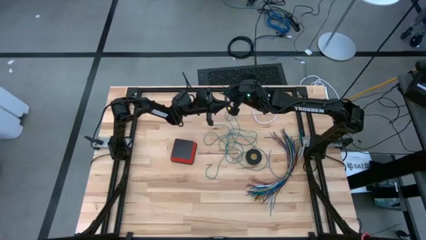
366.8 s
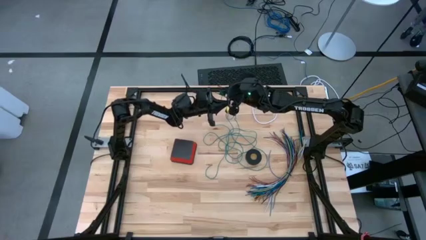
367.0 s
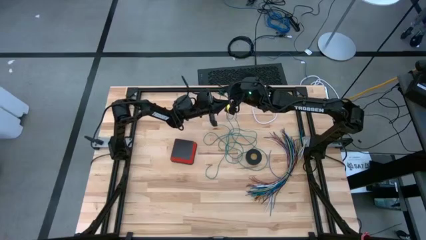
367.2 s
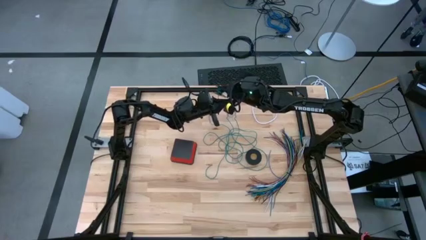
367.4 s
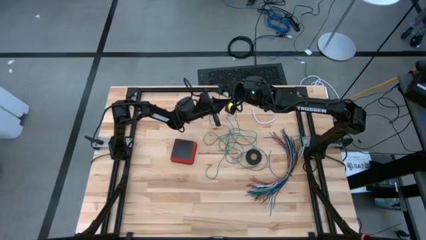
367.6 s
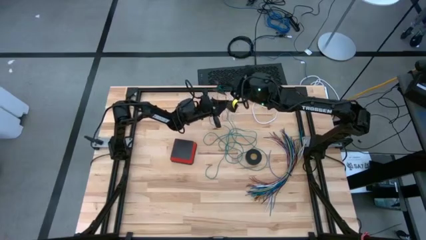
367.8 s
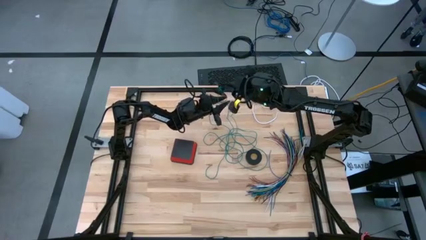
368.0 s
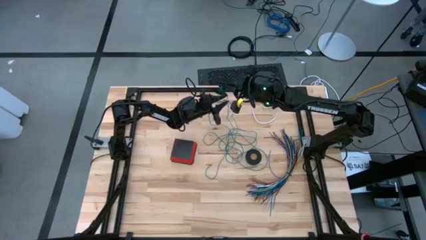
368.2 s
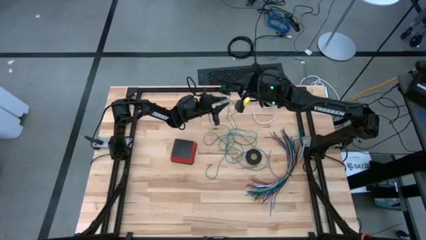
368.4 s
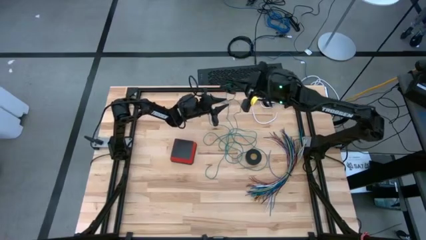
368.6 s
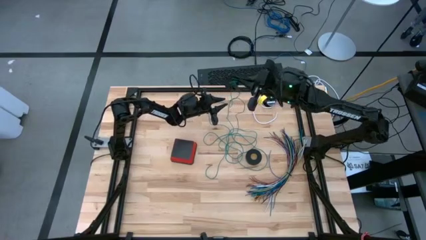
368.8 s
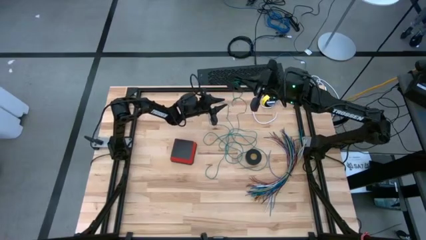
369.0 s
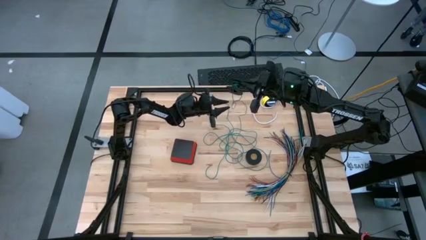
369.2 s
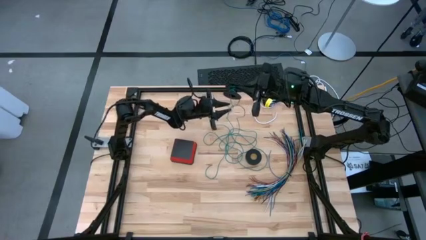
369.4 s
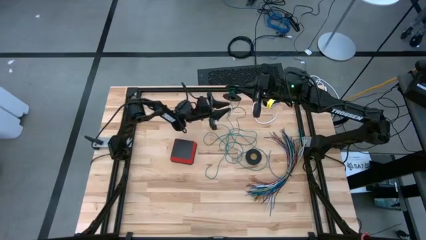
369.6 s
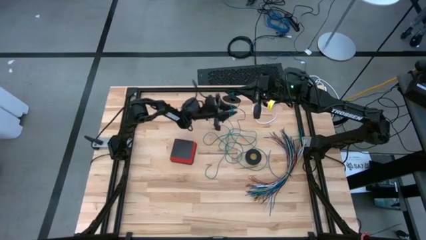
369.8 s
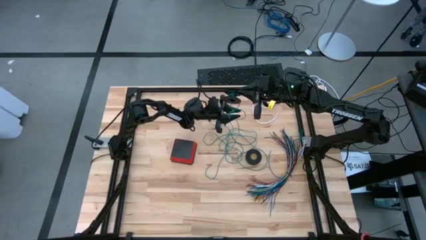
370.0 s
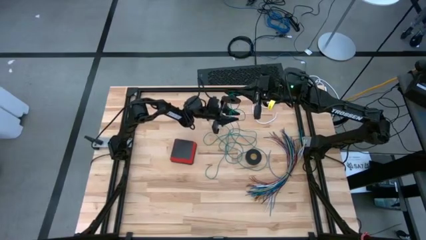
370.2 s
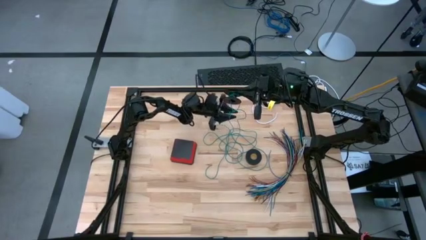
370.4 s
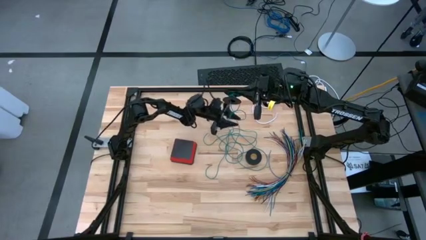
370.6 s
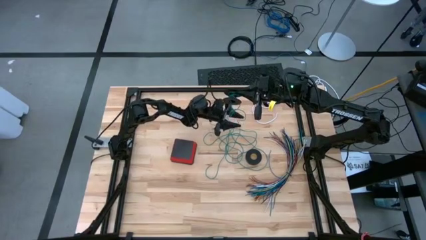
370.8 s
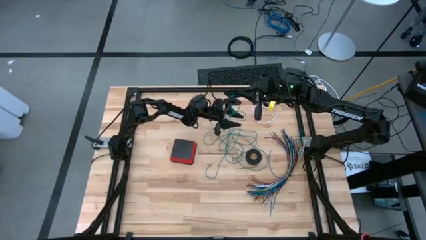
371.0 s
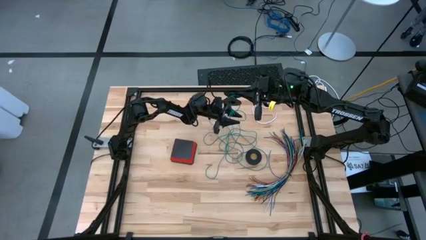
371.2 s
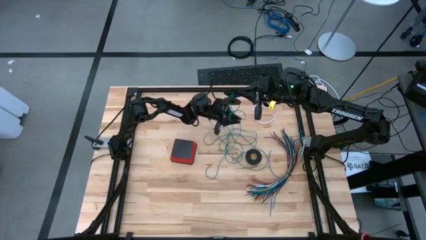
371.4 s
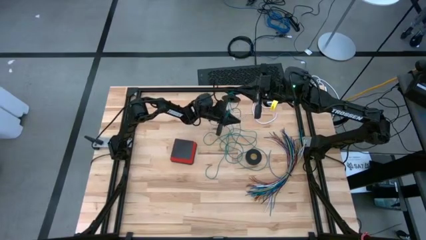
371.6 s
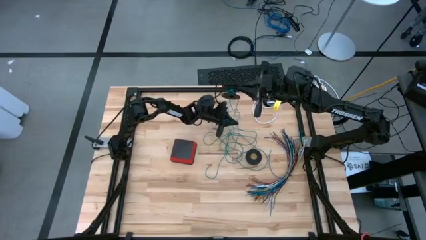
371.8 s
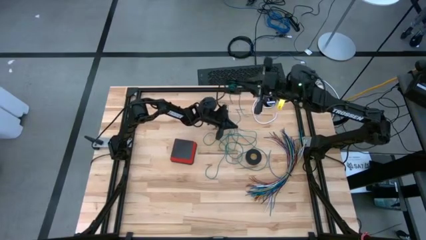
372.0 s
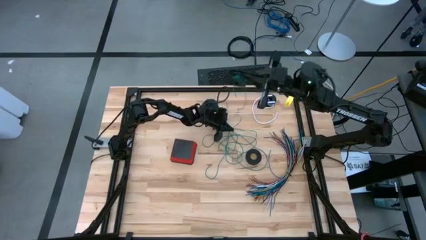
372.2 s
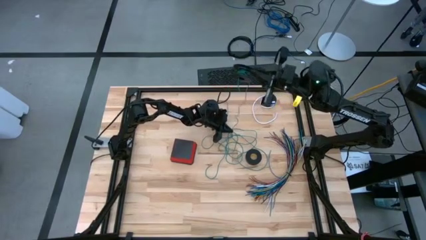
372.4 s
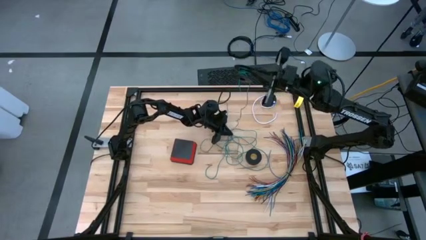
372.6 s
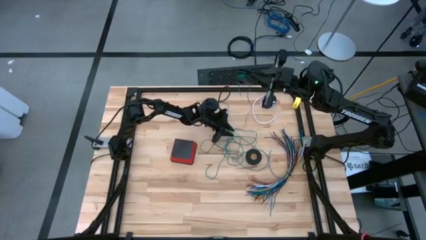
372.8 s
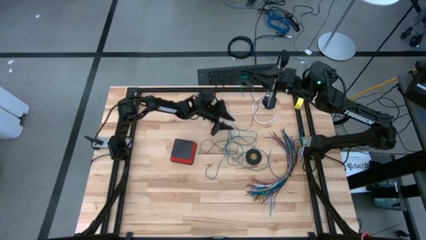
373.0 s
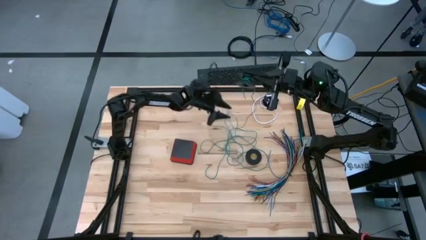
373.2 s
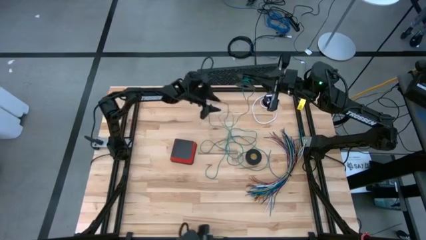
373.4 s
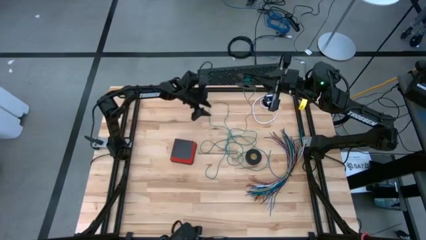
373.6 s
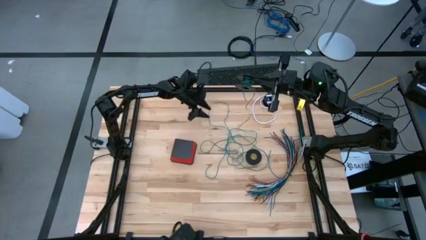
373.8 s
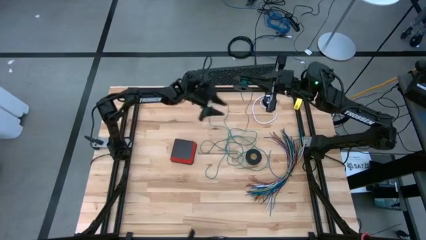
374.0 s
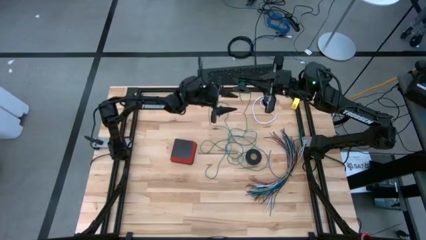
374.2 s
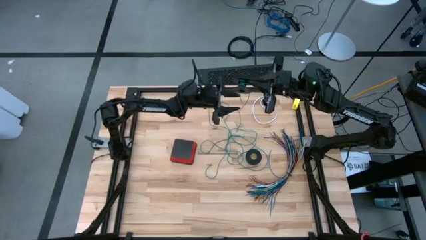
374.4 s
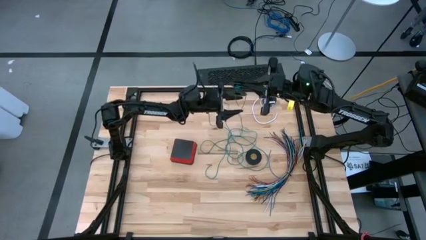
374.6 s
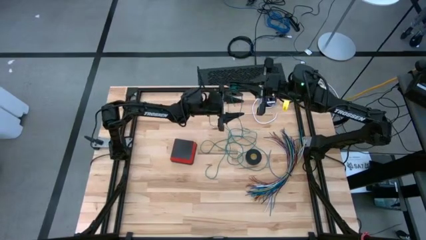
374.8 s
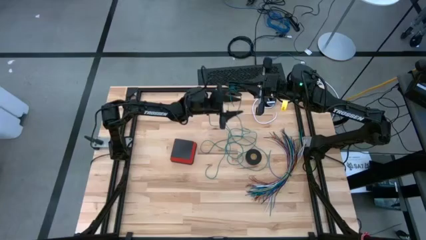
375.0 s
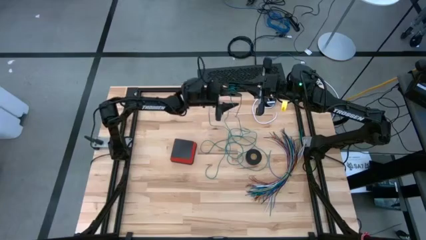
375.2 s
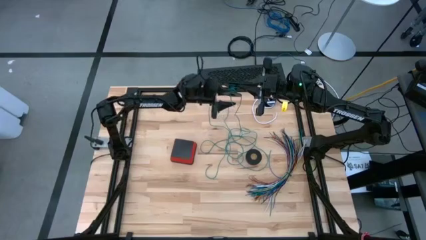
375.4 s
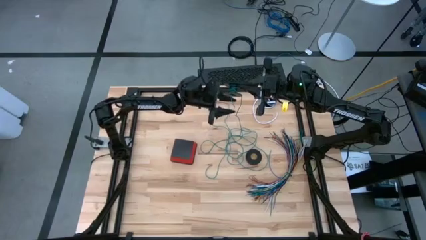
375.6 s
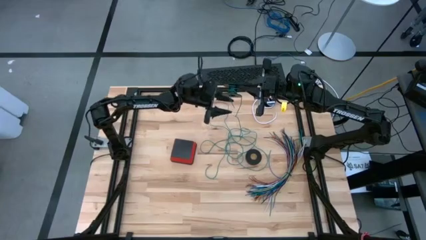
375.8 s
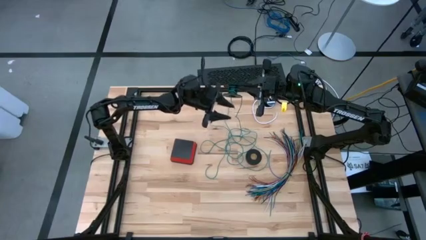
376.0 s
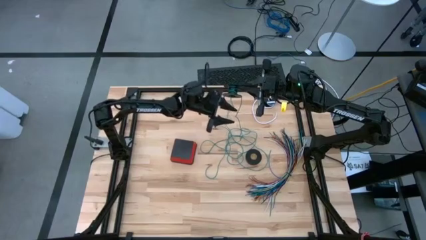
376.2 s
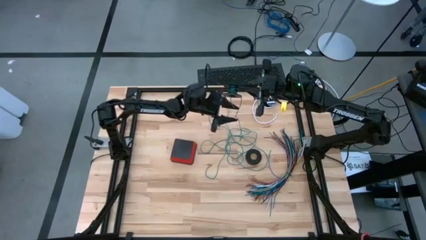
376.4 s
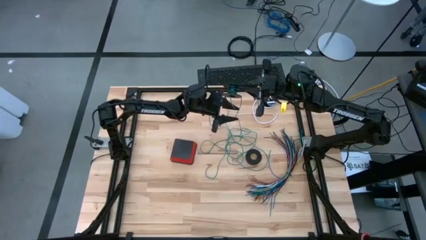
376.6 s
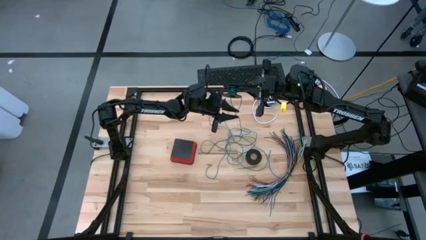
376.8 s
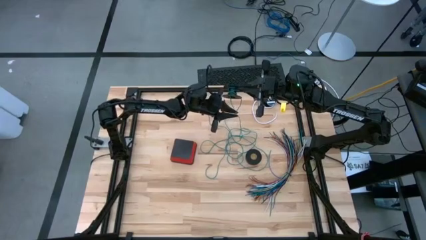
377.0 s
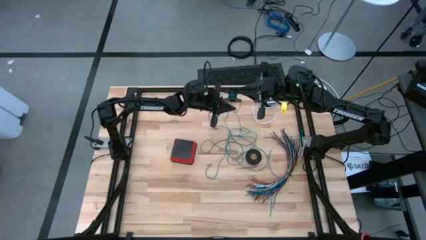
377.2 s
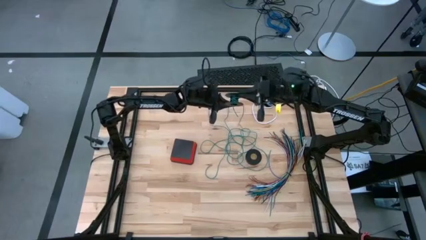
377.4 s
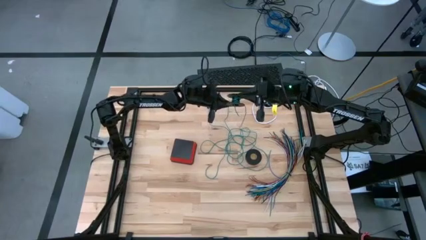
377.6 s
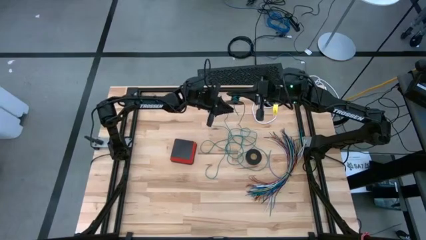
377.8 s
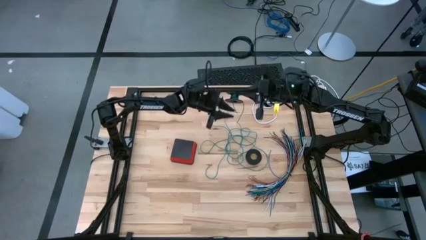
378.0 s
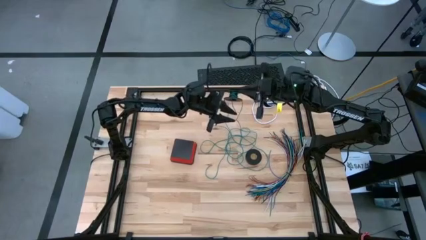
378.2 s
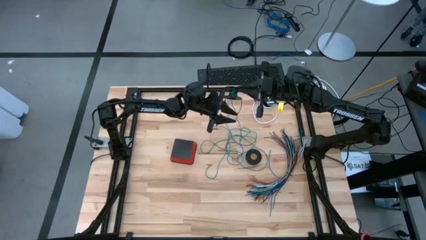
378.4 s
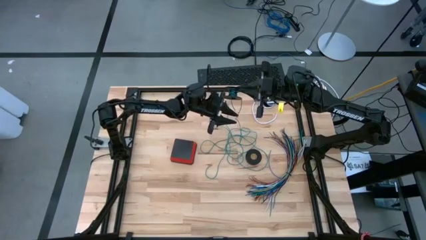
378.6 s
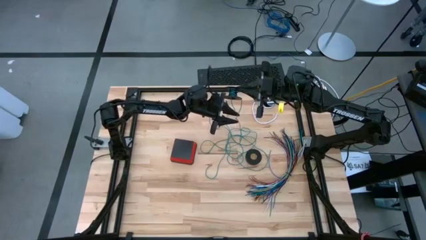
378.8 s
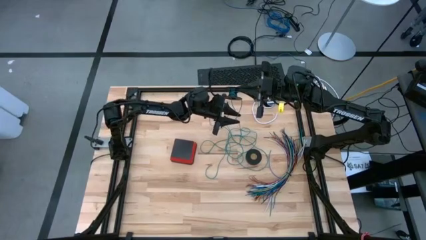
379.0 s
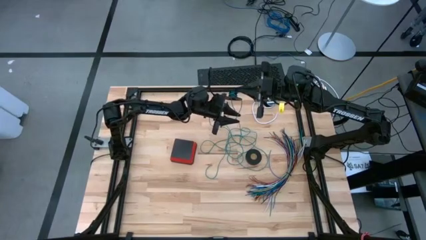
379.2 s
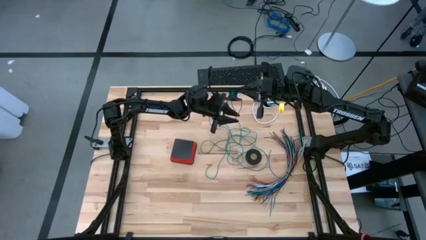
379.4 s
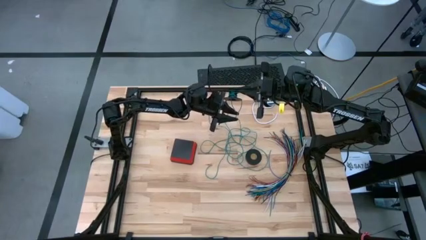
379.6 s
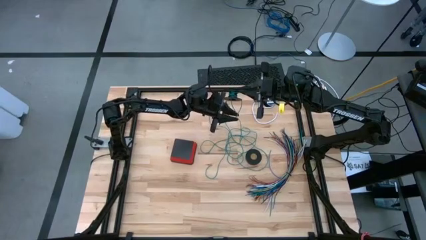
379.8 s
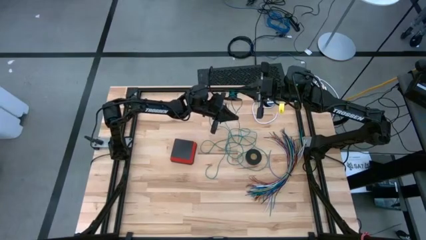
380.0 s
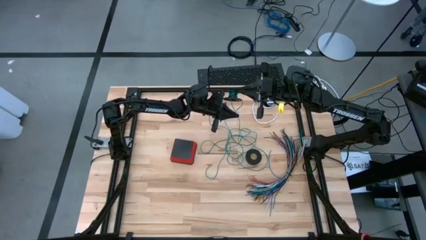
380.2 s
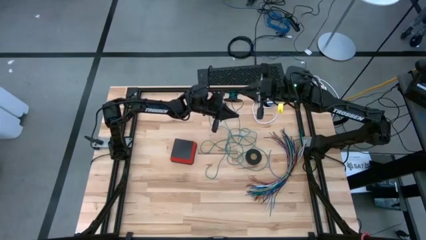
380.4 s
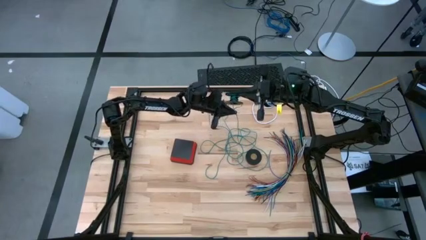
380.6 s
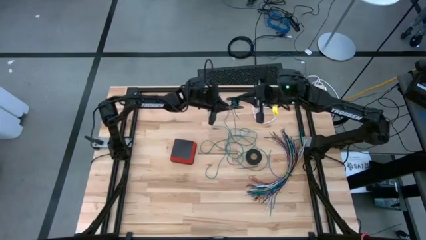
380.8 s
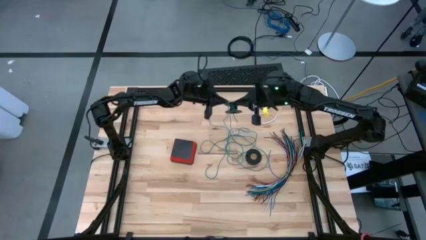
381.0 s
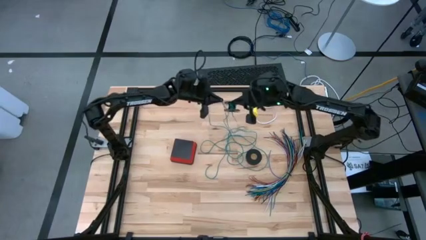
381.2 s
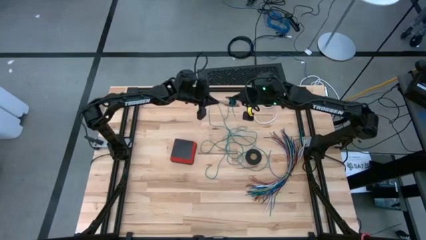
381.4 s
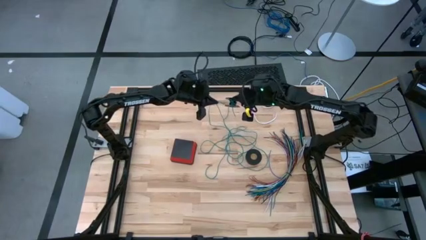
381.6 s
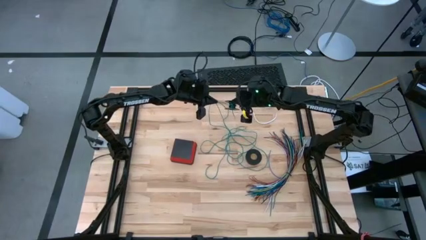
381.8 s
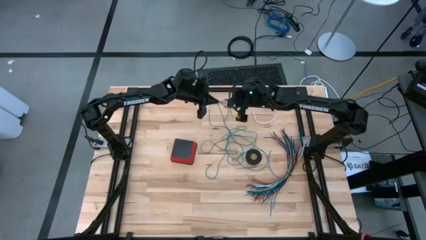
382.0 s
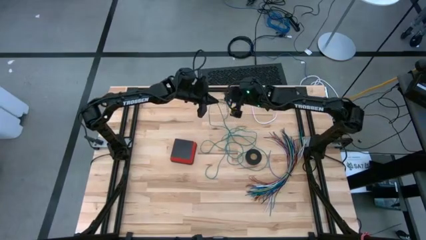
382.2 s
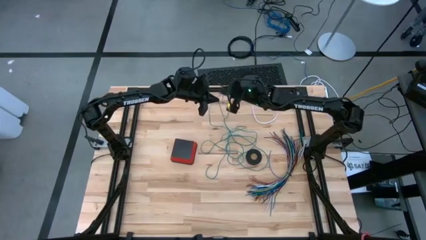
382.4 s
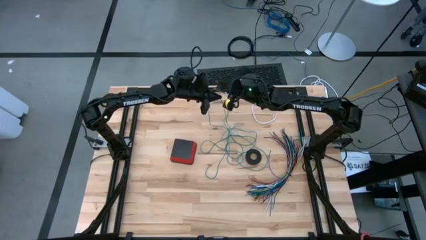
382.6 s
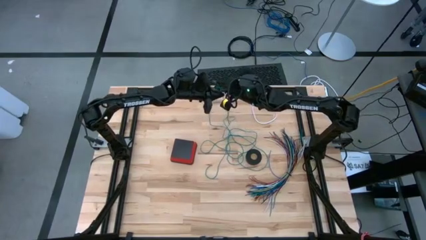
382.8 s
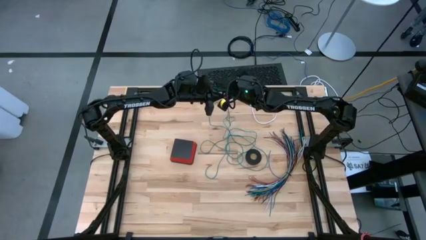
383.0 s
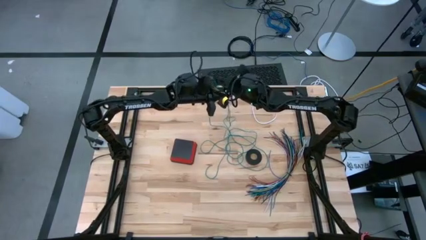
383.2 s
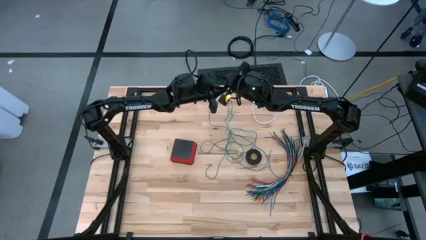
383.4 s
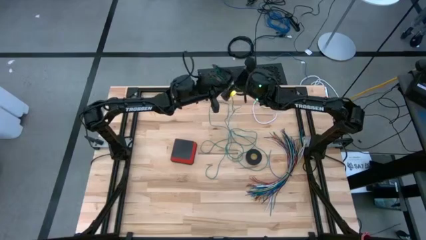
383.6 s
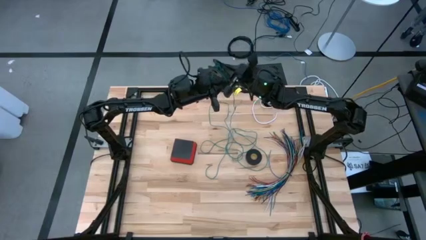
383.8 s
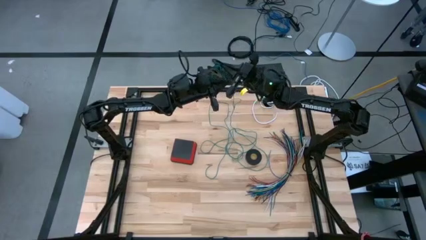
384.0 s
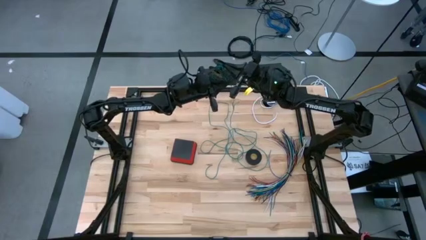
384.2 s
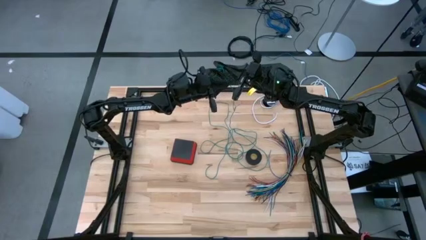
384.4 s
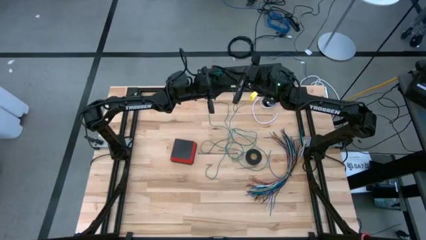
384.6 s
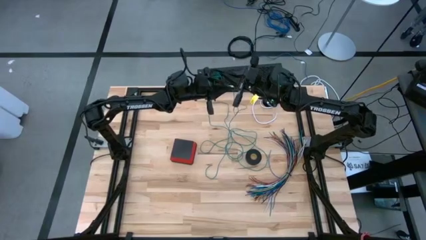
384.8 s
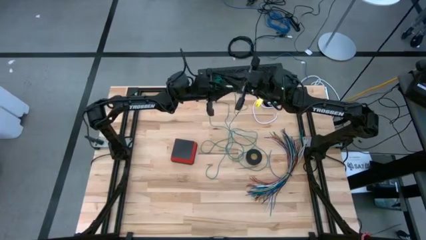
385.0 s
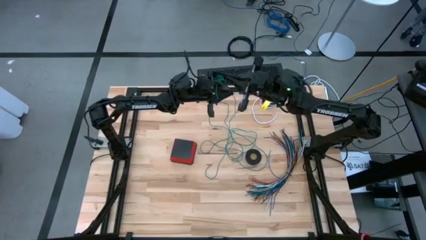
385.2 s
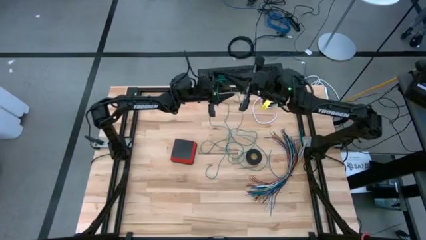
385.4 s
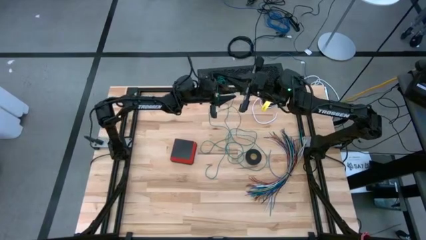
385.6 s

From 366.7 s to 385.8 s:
Task: Coiling cords
Coil the green wire cable on the spool
